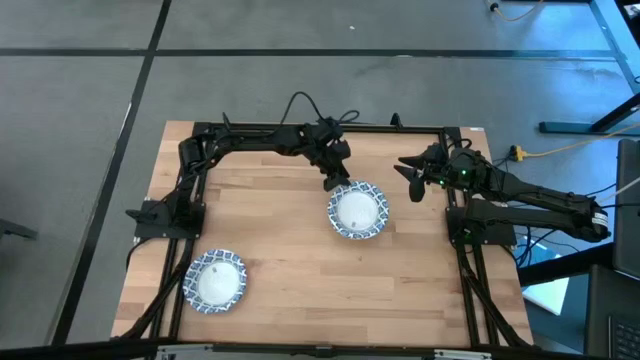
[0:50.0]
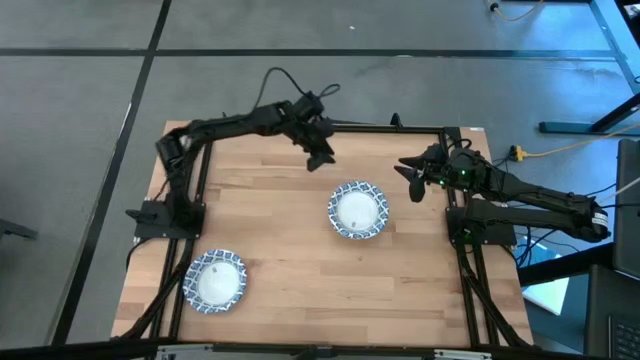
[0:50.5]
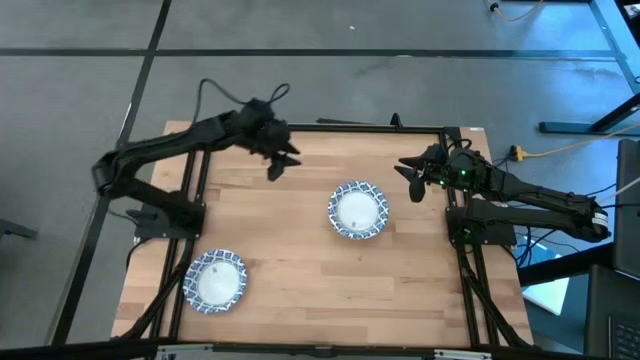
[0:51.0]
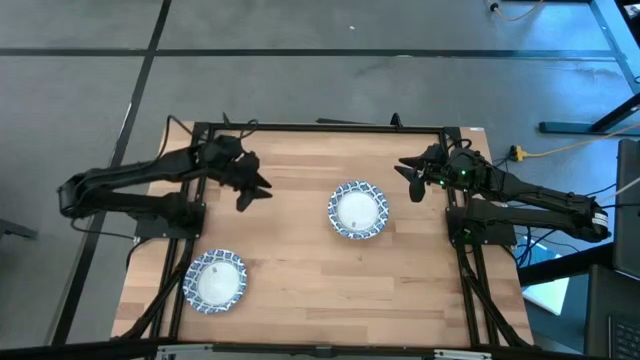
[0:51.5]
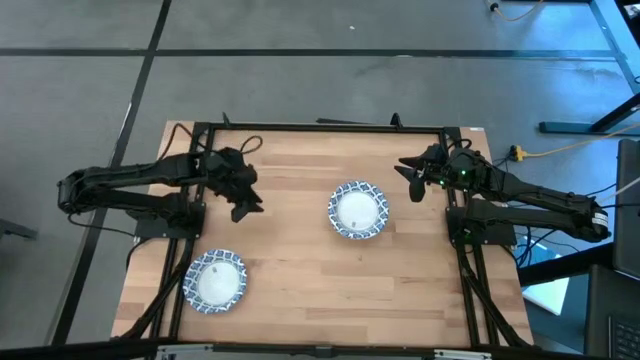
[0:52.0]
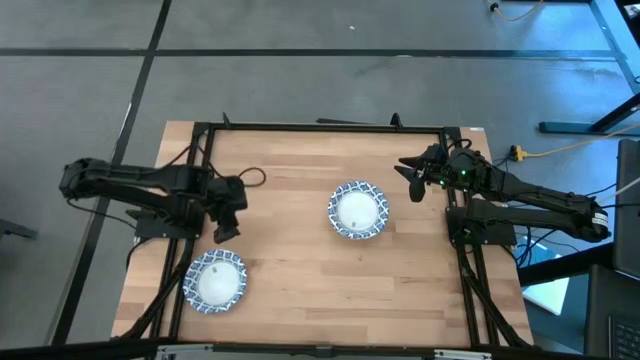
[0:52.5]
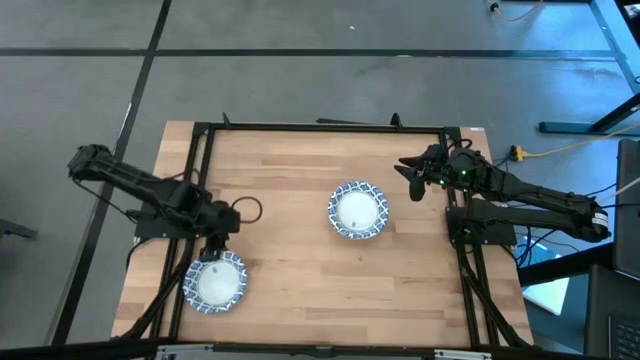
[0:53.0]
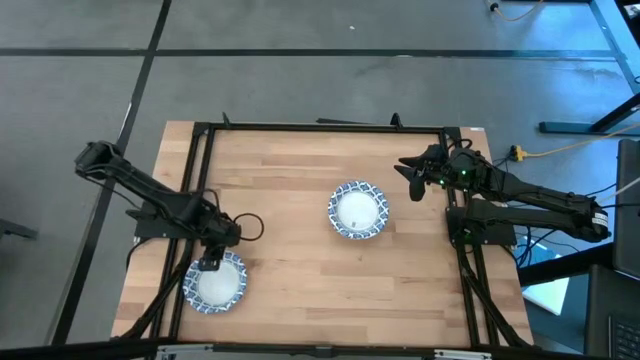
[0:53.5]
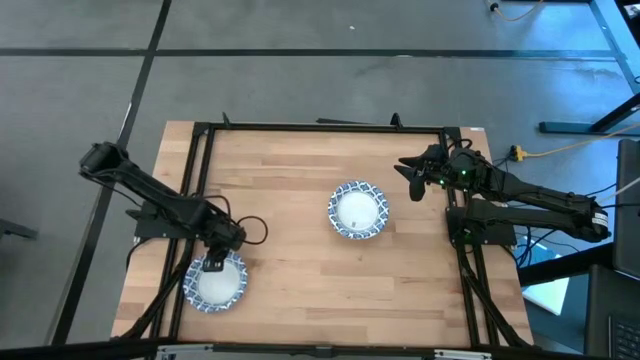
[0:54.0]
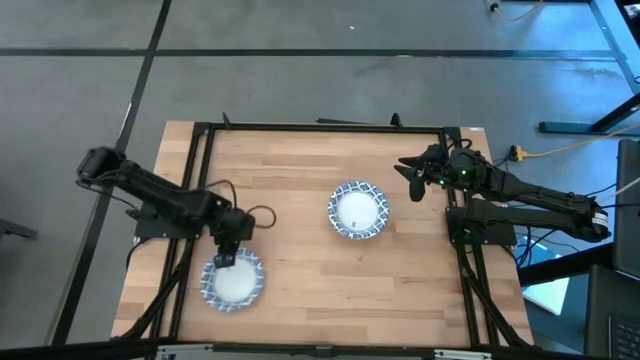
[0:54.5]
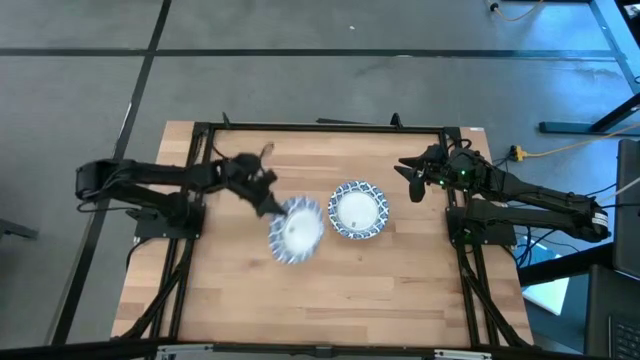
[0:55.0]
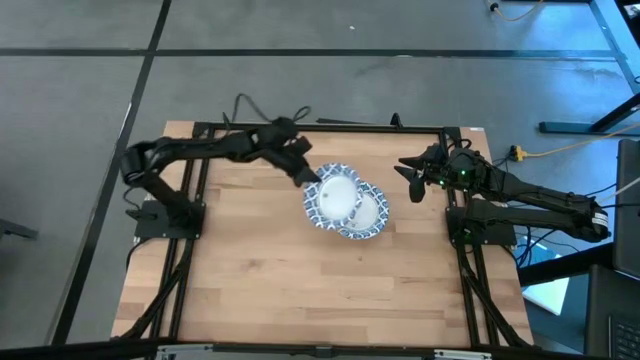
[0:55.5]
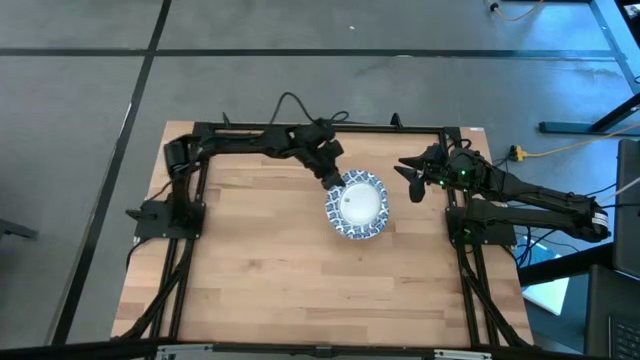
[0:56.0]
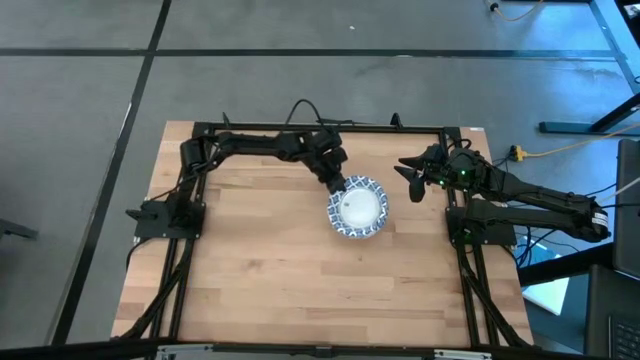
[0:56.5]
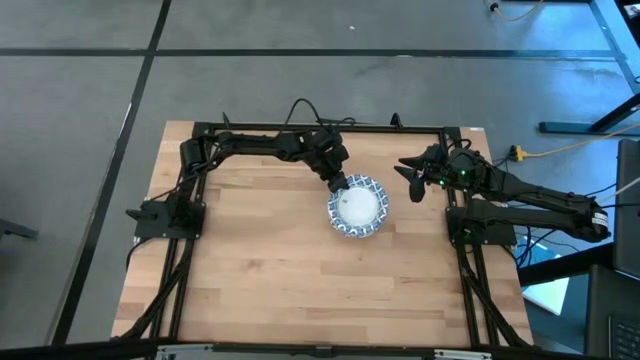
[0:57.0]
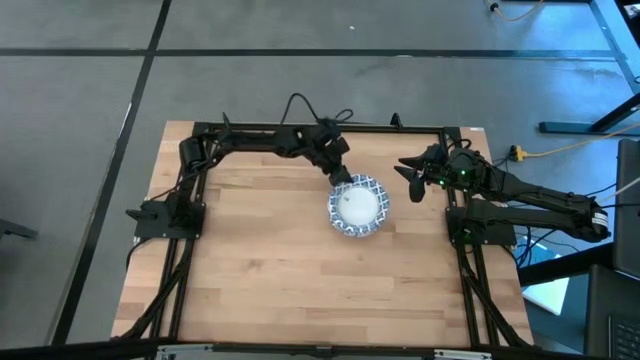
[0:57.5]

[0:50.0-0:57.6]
Task: Nest bowls inside each other
Stack the white patterned bowl on the white patterned bowl

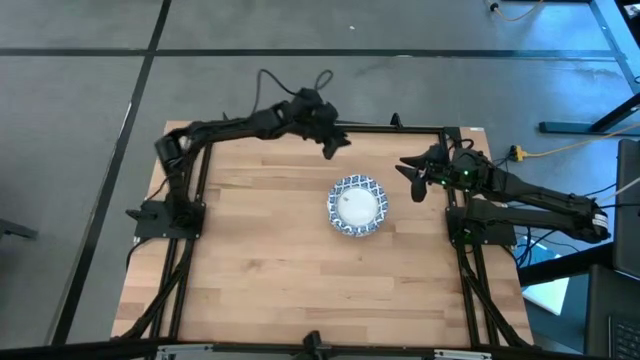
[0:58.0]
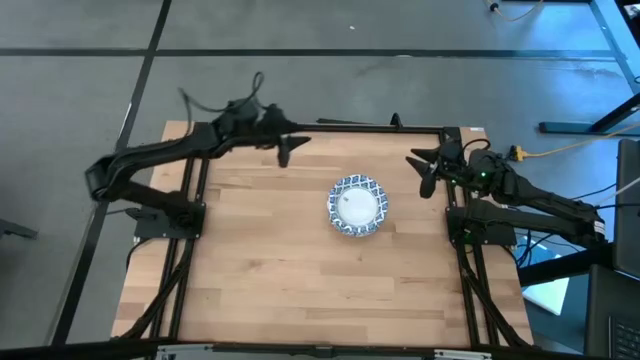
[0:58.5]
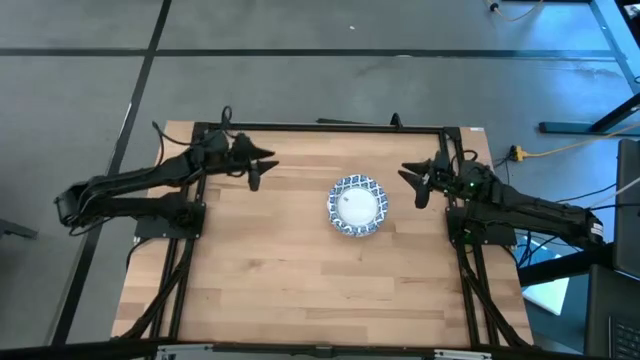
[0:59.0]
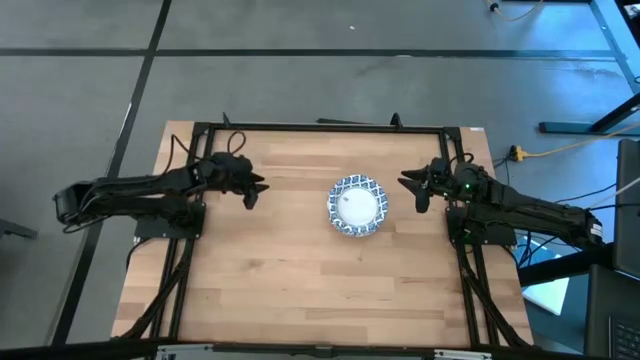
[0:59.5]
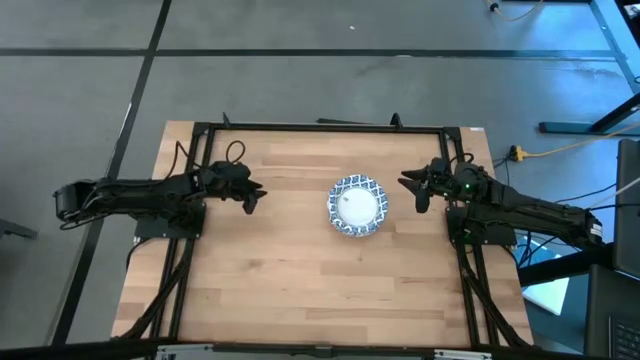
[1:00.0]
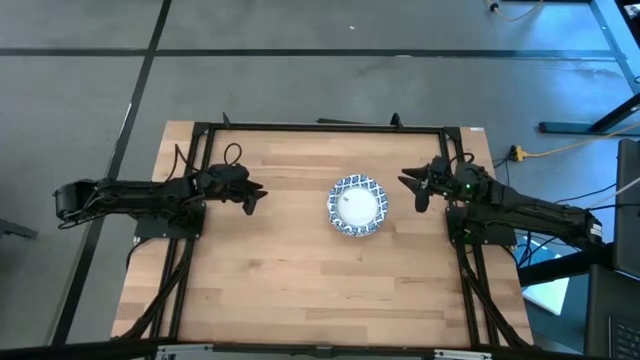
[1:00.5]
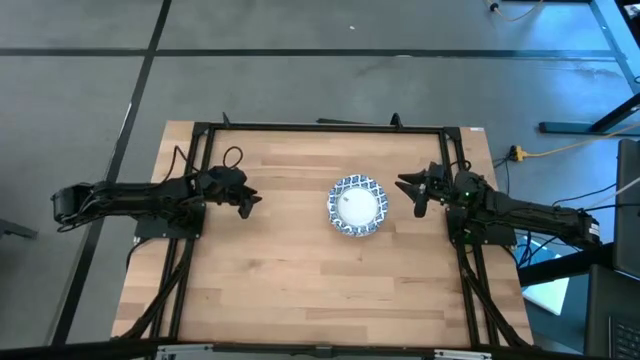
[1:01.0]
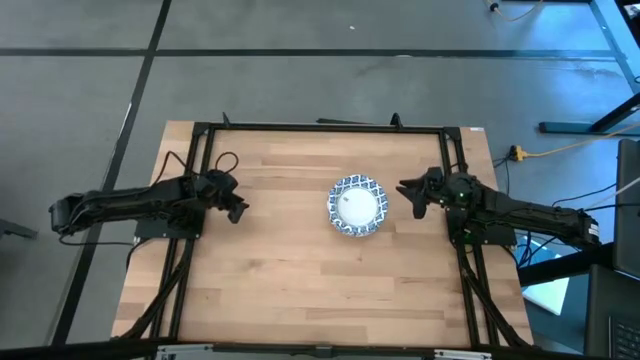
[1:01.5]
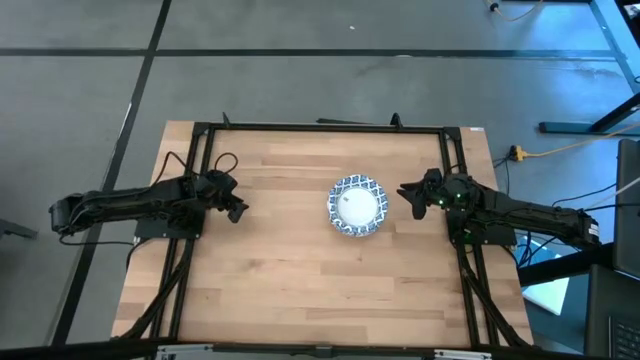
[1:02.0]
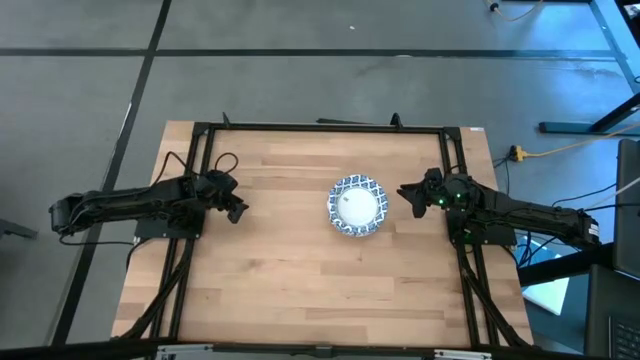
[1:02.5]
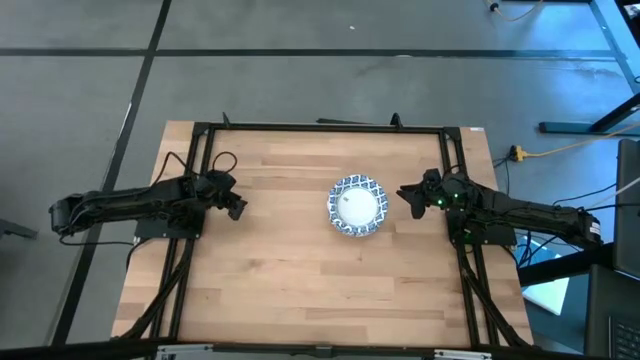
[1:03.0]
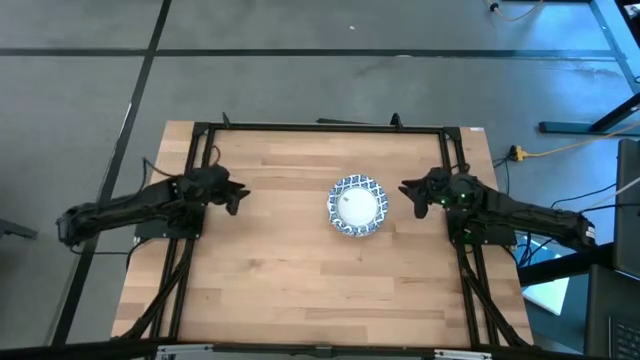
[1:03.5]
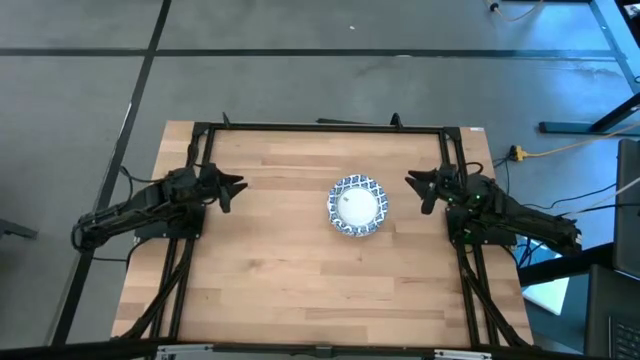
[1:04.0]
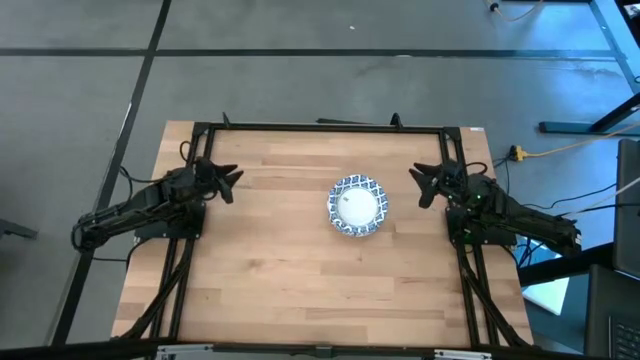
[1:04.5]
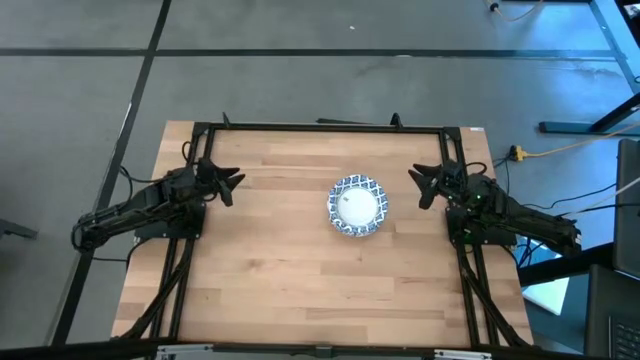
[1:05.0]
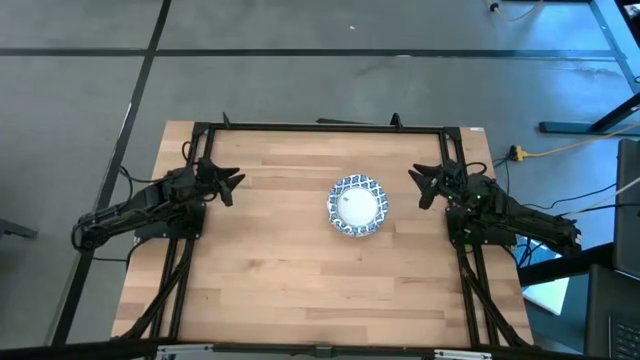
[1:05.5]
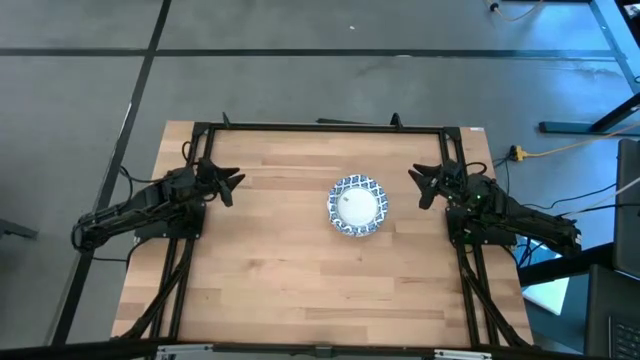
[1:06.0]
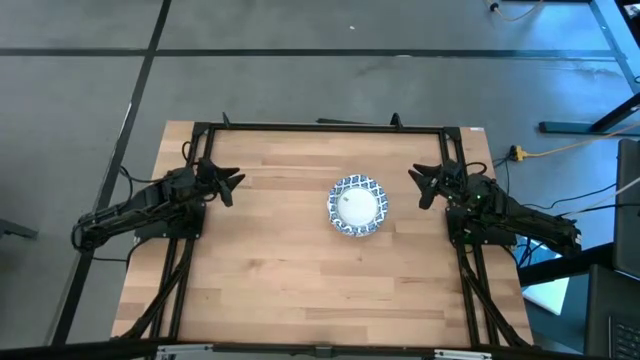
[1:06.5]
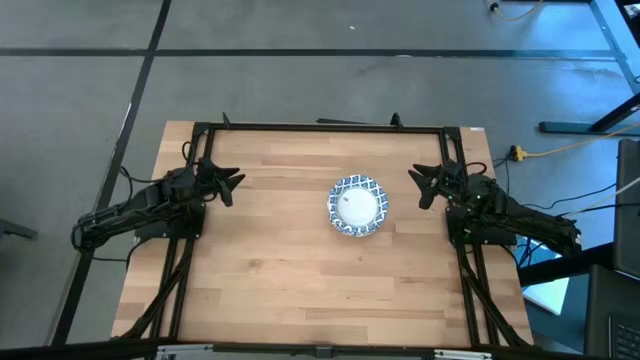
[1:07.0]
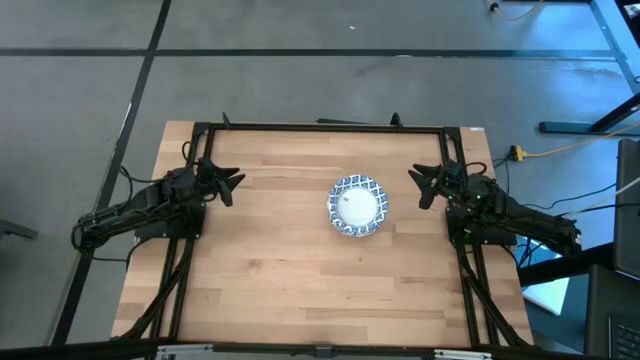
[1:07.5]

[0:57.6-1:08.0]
Return to Home Position

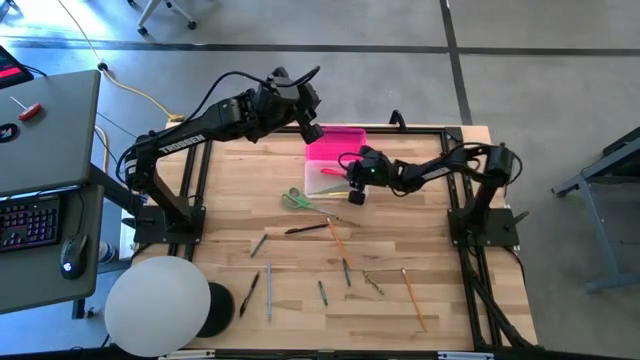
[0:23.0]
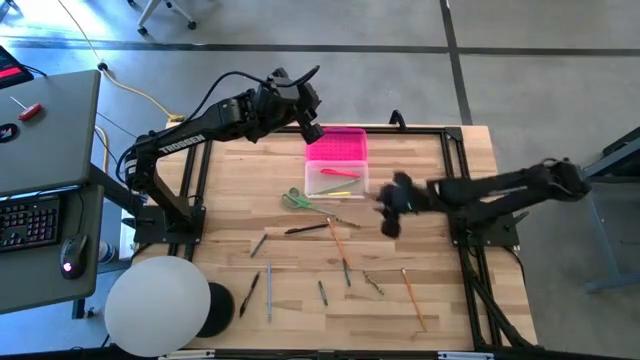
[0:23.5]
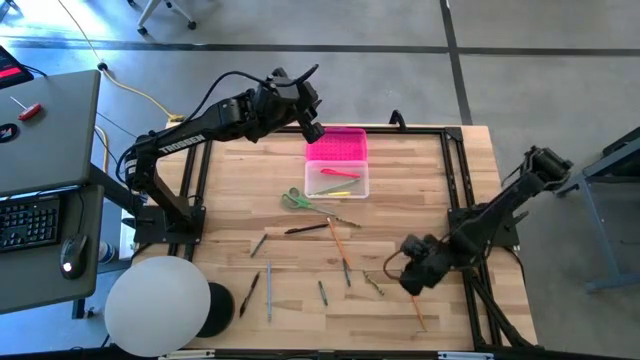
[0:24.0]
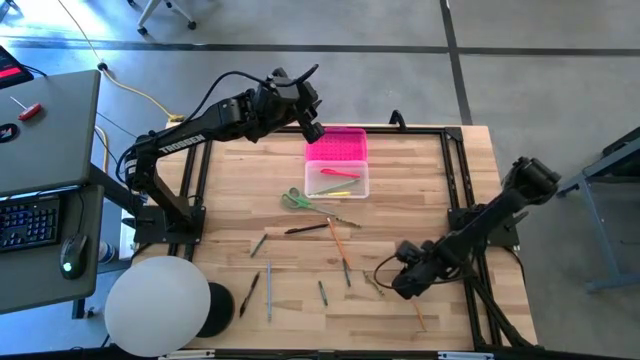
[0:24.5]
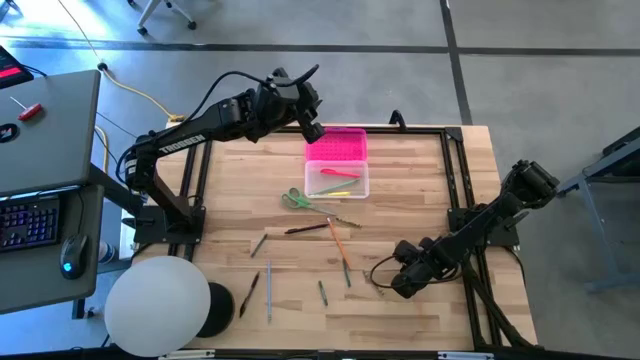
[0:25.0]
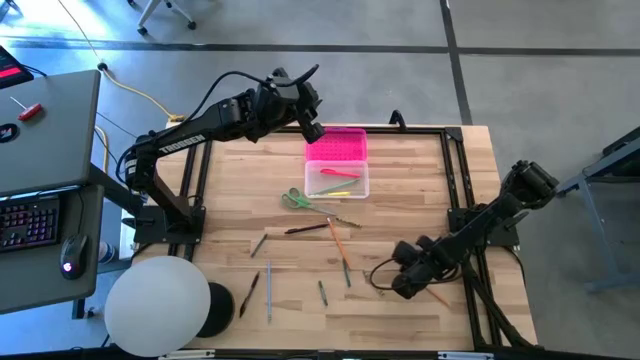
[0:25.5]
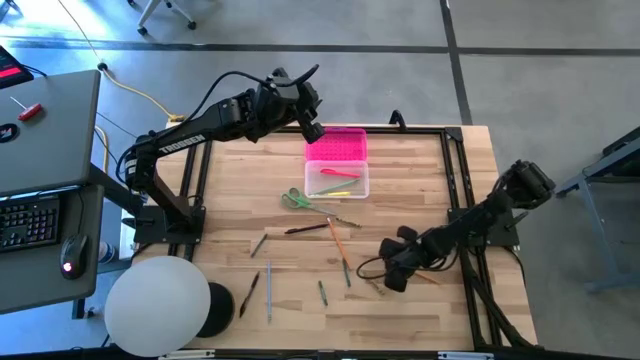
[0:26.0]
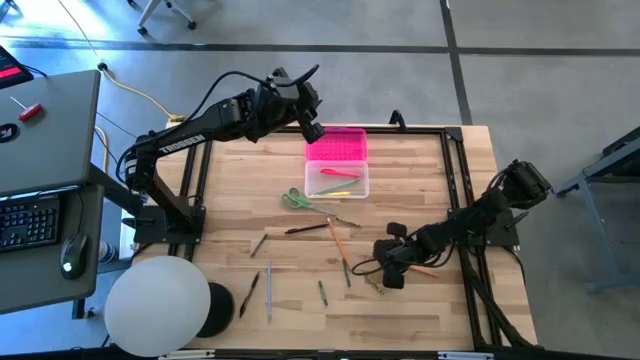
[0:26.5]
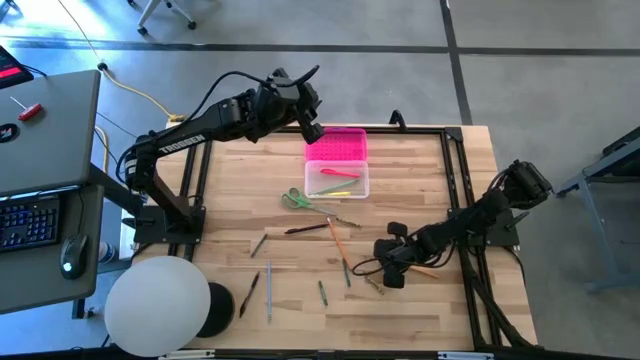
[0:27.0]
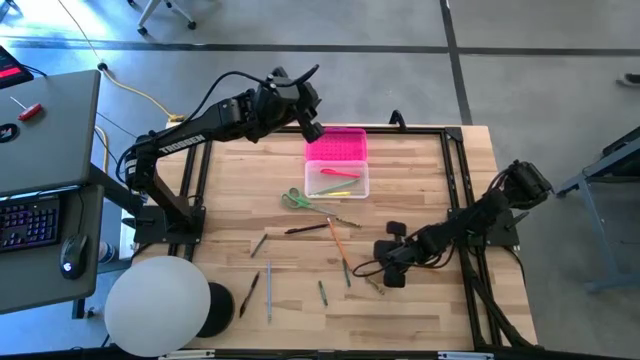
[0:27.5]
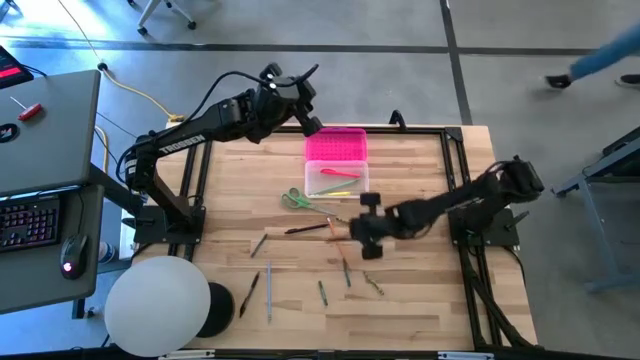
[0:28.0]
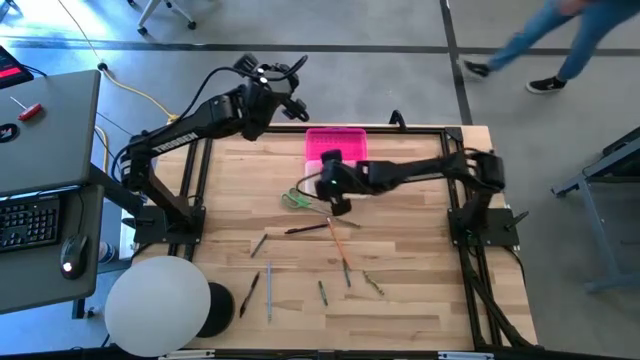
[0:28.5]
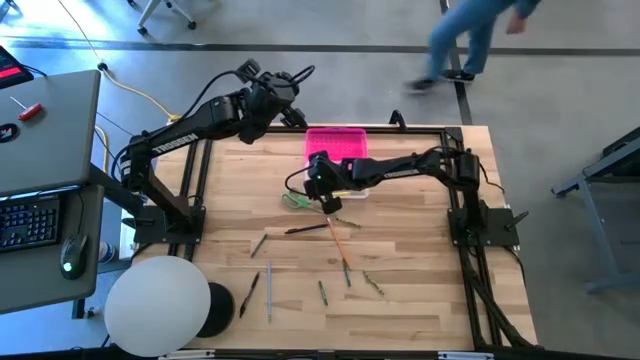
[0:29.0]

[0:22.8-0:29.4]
Task: Pick & place school supplies into a supply box
Put the right yellow pencil into the supply box
